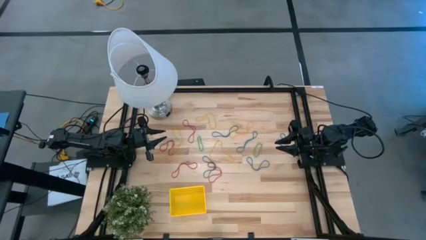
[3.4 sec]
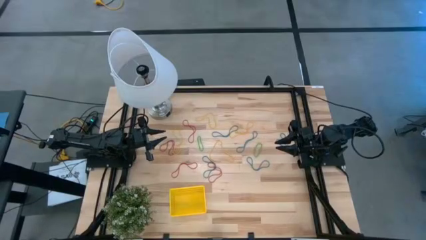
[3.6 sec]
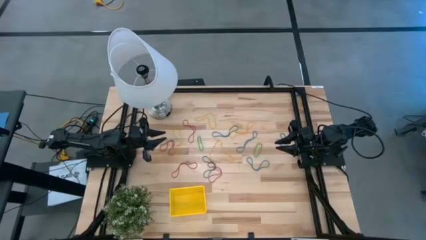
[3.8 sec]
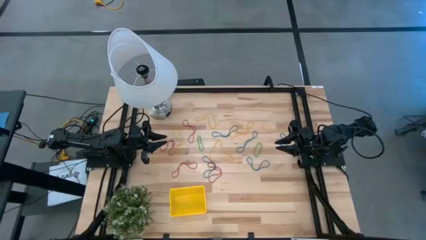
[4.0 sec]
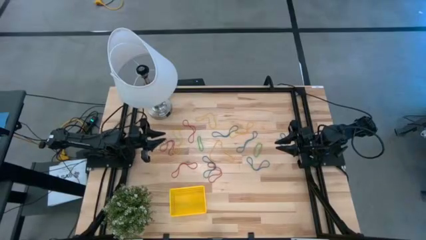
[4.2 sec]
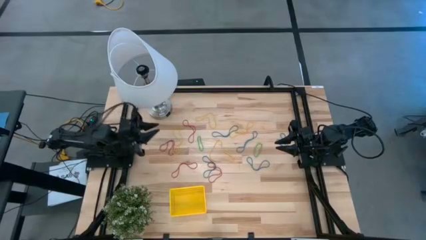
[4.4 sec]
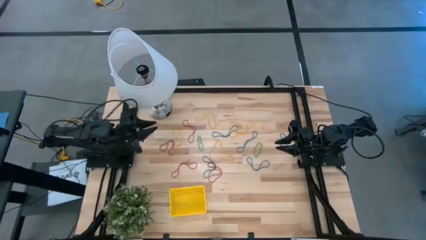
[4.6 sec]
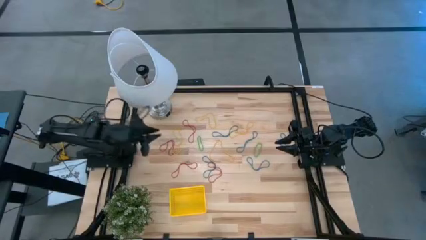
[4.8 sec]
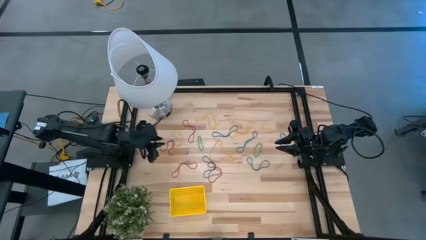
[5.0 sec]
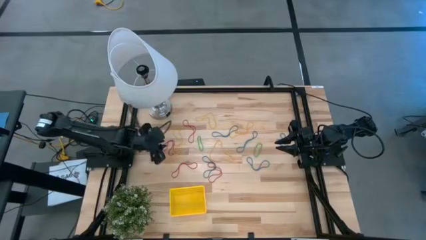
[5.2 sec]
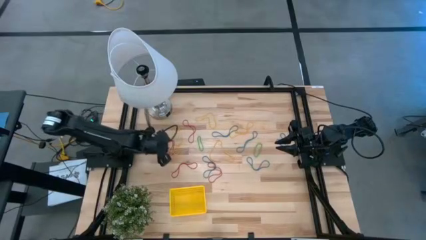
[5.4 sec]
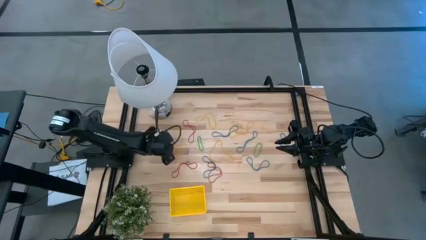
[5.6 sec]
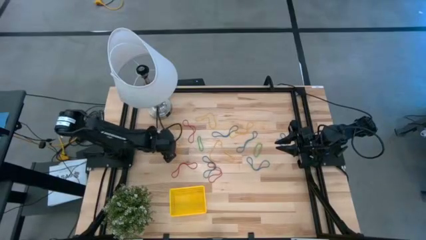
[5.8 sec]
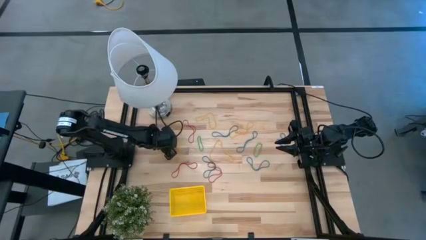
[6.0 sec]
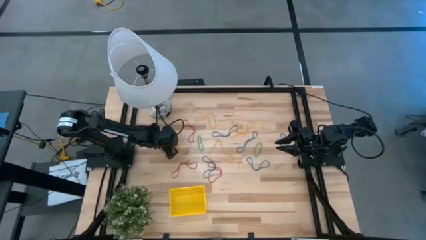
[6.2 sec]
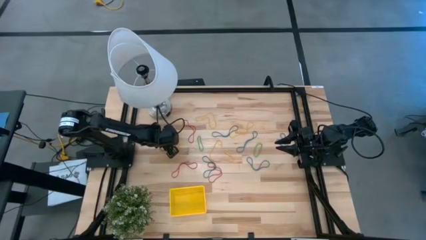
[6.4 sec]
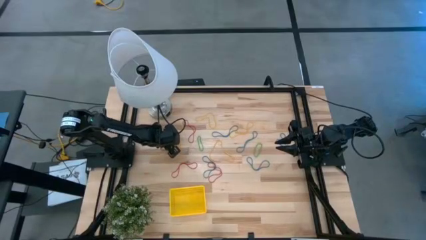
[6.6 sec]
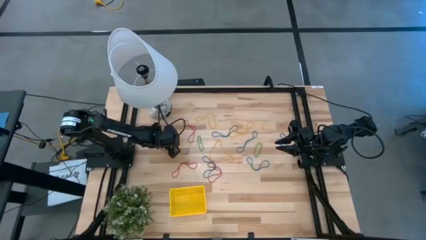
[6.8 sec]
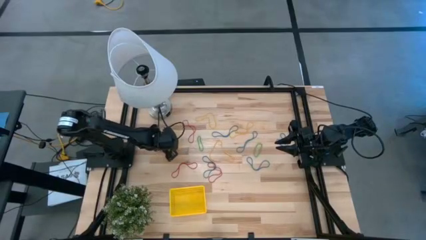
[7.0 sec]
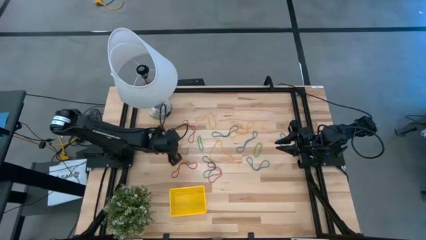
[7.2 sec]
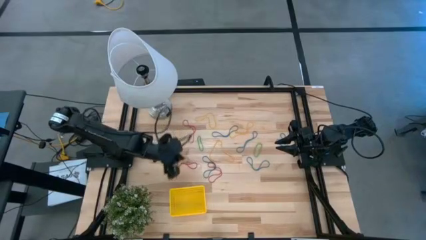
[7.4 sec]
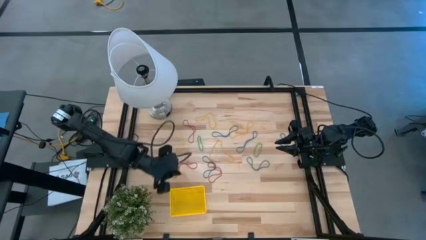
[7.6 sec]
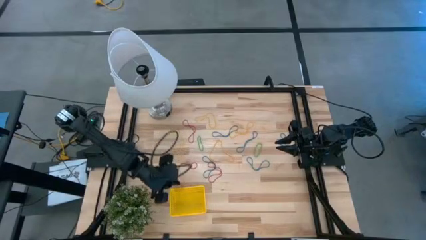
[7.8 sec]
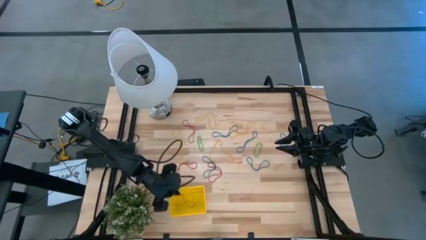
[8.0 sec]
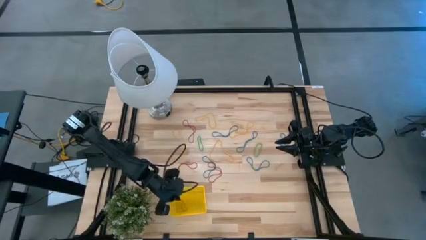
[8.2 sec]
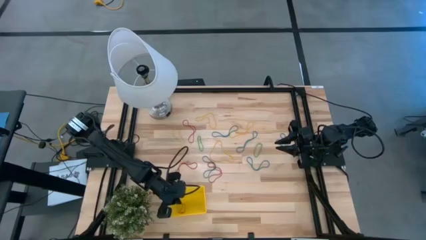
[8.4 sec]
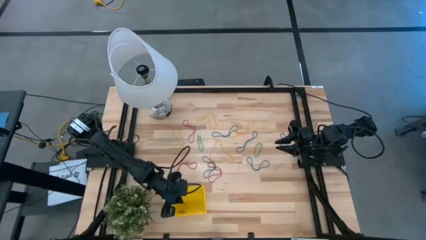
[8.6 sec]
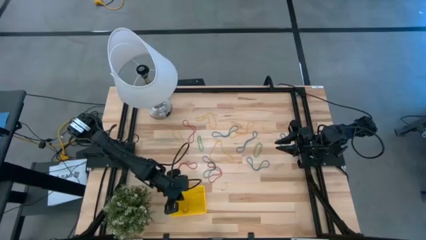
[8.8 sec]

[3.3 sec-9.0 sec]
Task: Pick and place items into bin
Put the red rubber band into the yellow bin

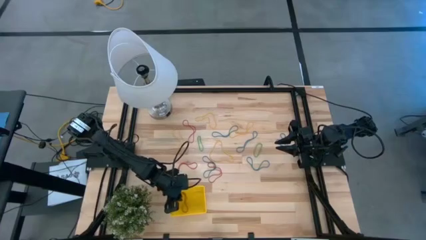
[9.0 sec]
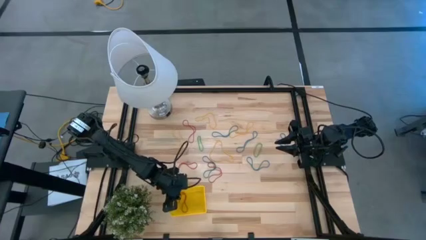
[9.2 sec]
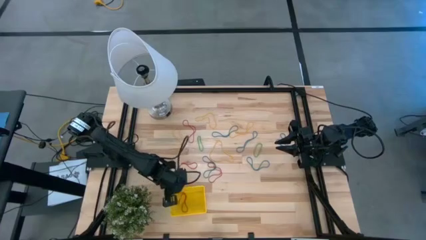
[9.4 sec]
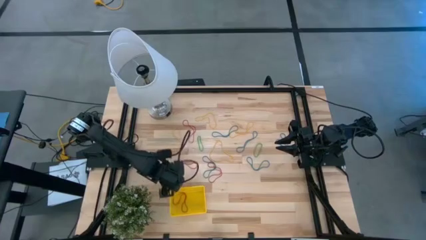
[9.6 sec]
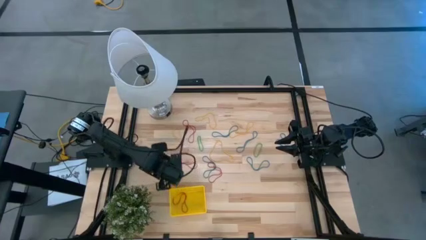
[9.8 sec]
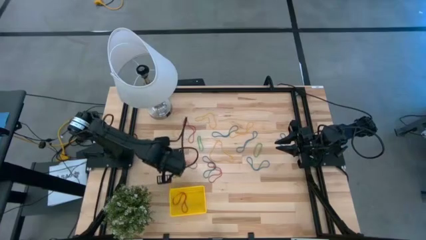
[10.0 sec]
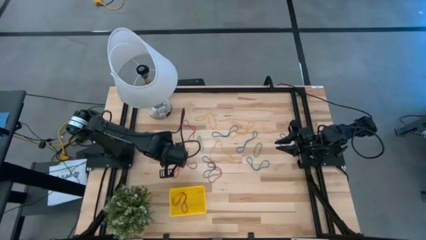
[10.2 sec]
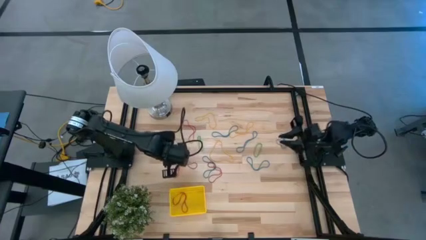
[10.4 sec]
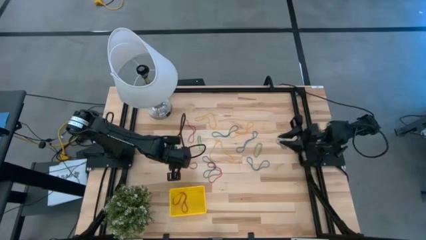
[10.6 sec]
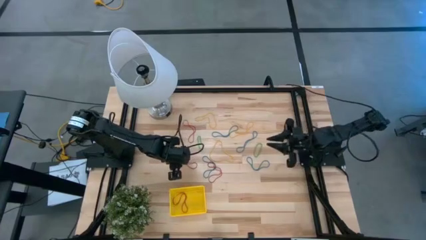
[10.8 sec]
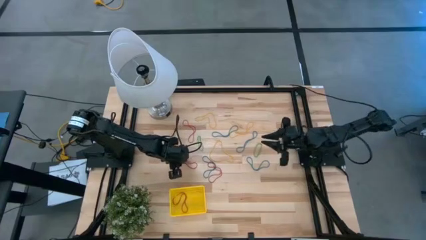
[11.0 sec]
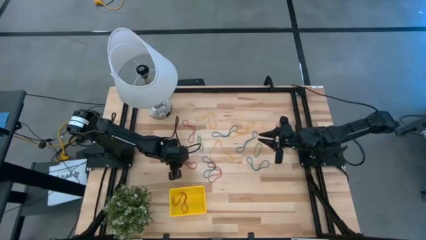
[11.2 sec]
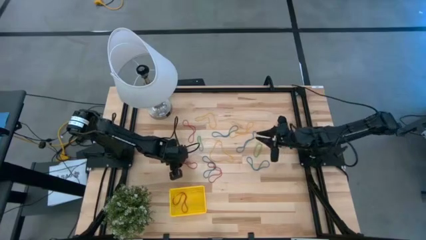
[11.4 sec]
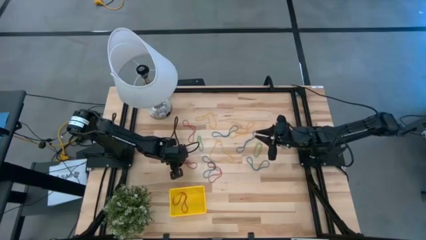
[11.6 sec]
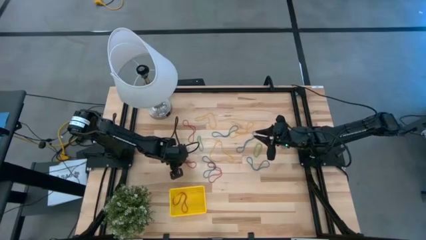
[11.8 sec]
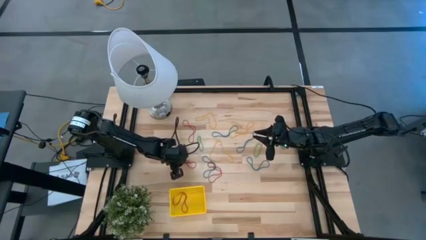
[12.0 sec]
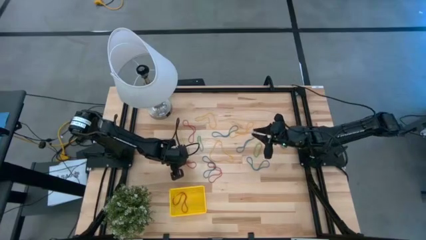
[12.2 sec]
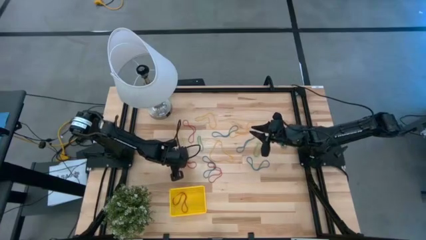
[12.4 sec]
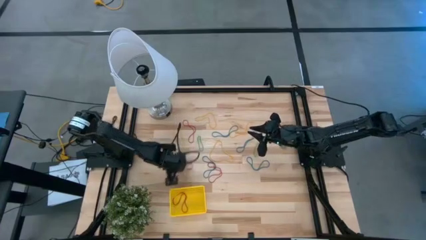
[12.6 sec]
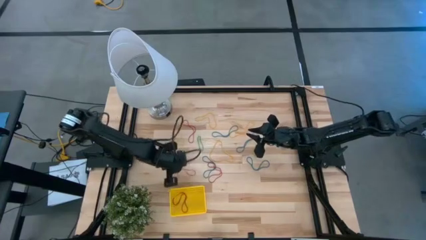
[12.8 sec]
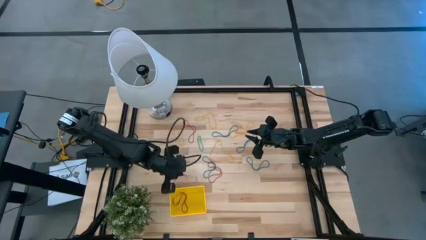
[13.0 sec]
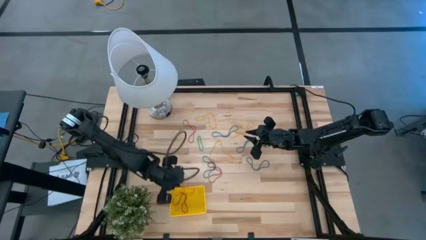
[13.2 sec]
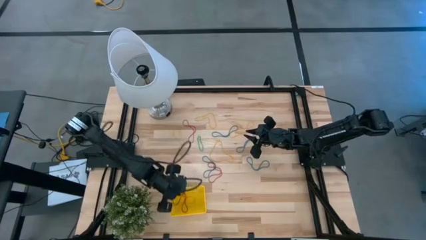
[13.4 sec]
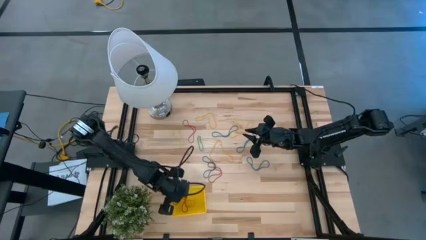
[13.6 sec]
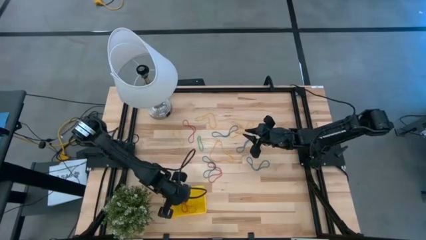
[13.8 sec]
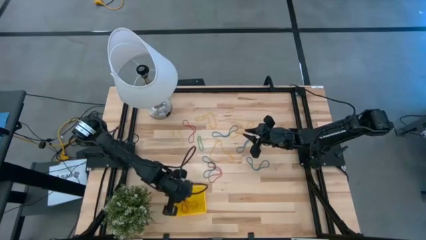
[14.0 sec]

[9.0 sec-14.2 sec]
Put the red rubber band into the yellow bin

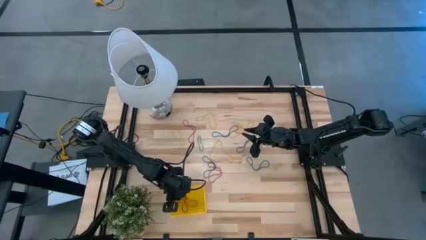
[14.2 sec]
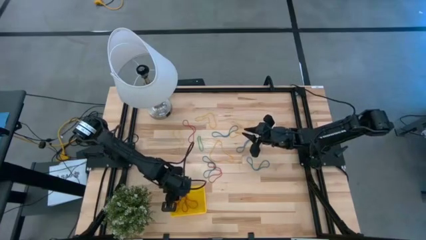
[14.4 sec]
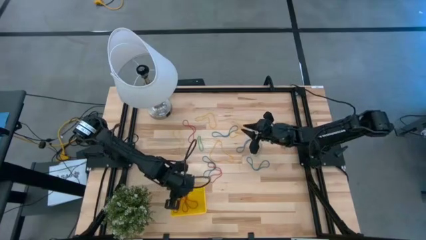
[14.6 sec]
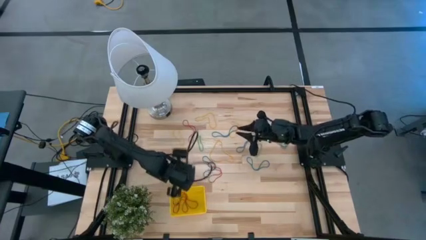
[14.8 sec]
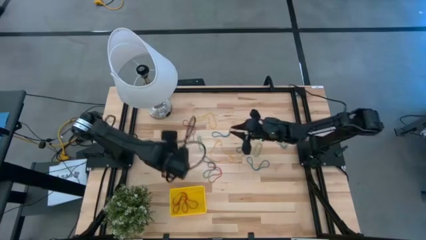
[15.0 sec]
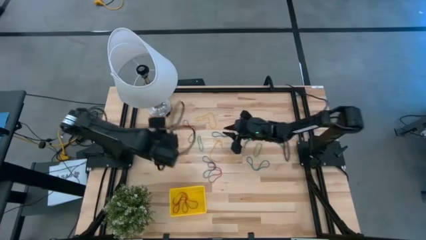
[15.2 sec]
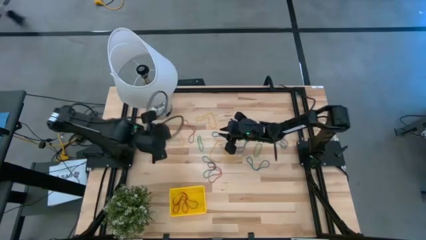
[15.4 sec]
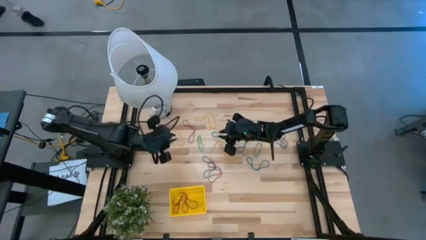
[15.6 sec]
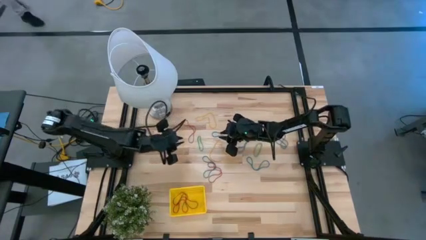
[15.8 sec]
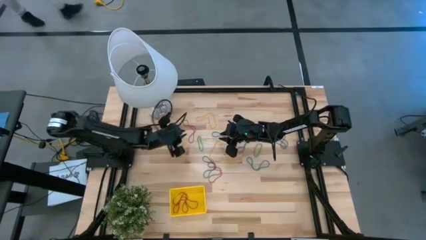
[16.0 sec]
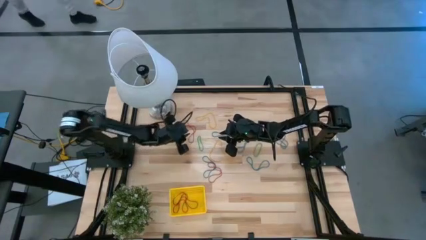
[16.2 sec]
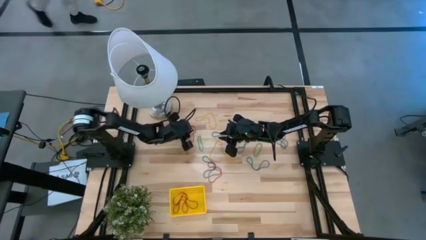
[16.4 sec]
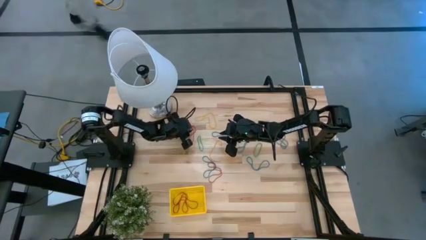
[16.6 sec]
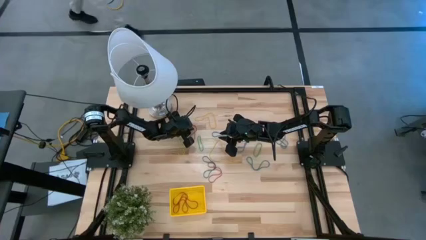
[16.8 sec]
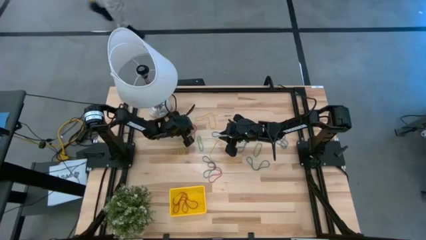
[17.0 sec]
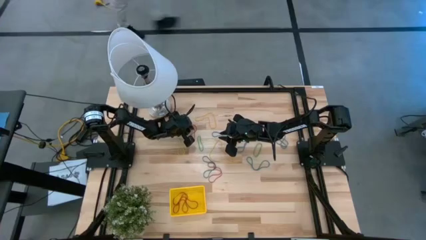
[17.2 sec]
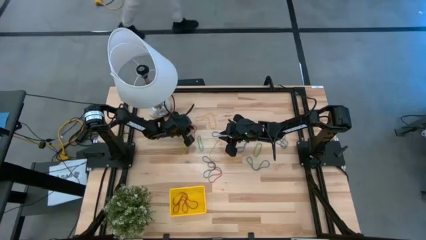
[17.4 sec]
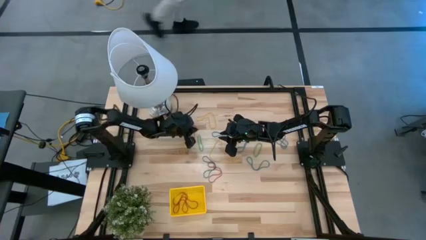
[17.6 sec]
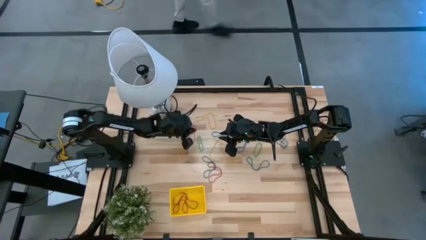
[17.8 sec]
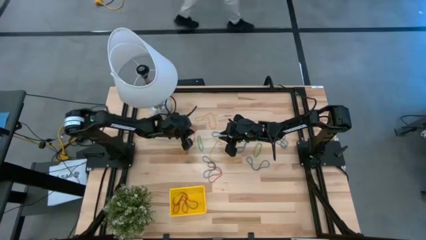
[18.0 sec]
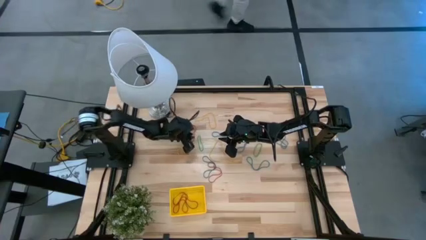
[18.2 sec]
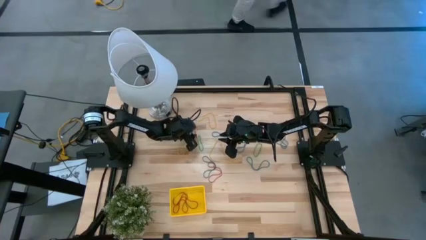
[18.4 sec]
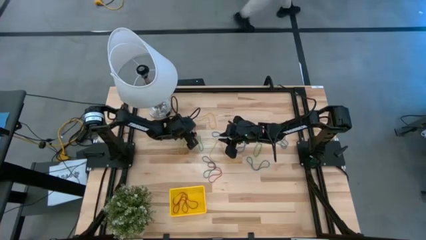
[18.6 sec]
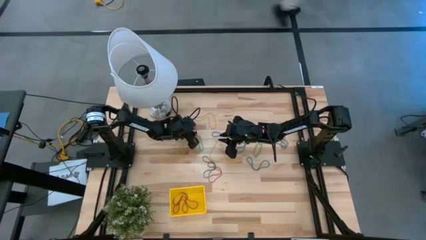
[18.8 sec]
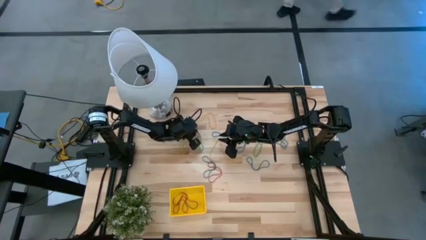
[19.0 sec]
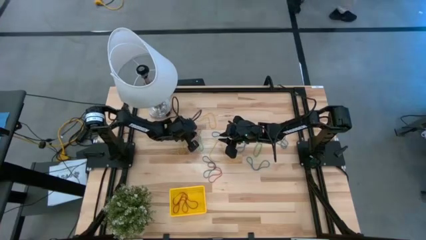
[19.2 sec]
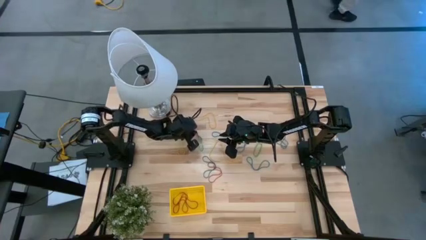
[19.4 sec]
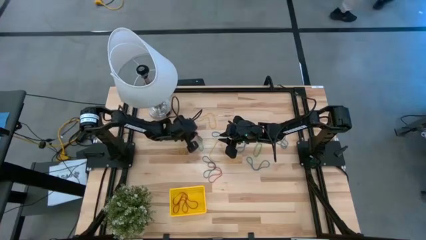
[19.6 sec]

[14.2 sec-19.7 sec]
Put the red rubber band into the yellow bin

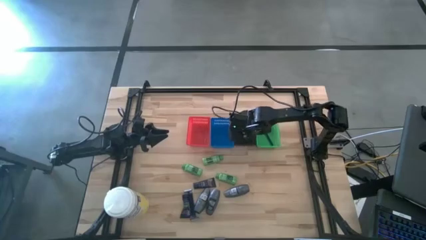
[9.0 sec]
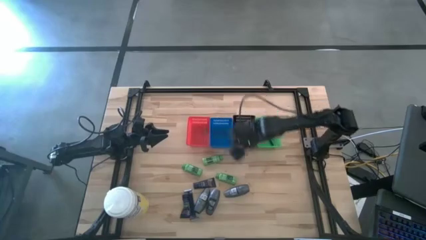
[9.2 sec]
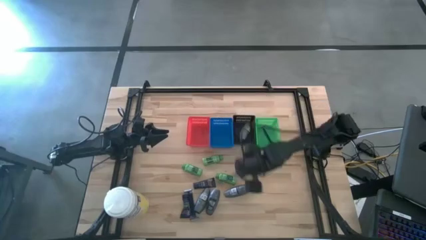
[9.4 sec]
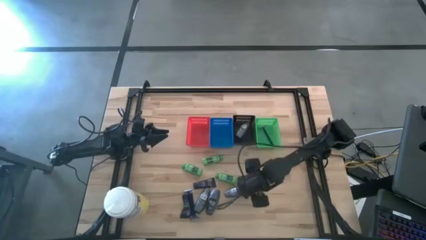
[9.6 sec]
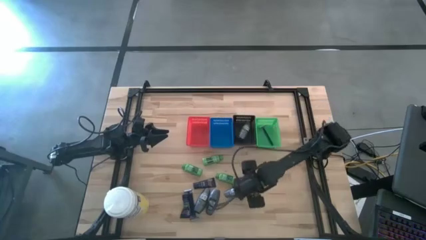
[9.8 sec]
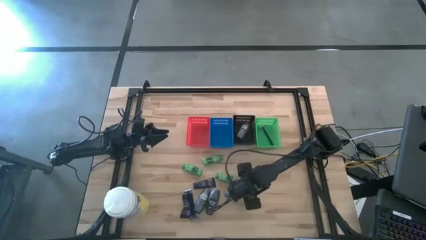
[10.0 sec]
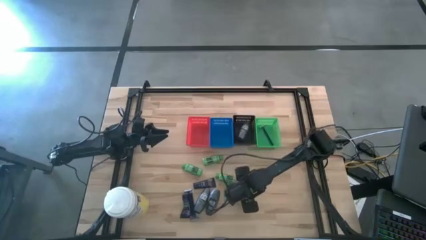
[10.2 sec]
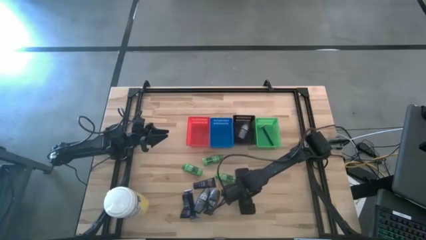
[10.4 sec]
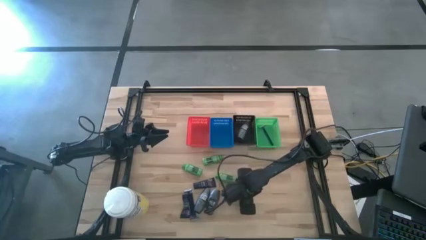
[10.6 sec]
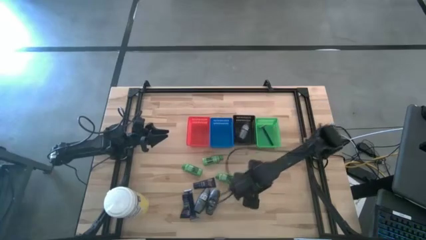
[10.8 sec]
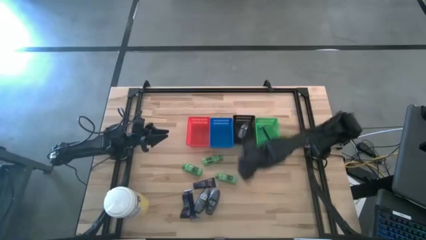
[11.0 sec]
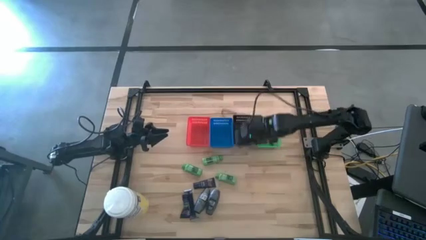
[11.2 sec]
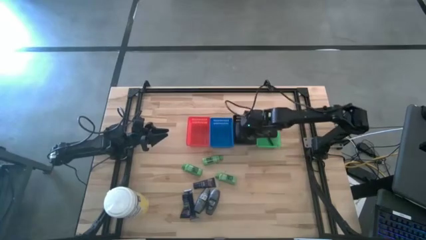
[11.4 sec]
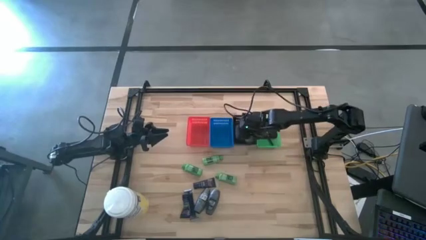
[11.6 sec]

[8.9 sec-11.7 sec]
Task: Pick & Place Travel size toiletries
Put the gray deodorant into the black bin
